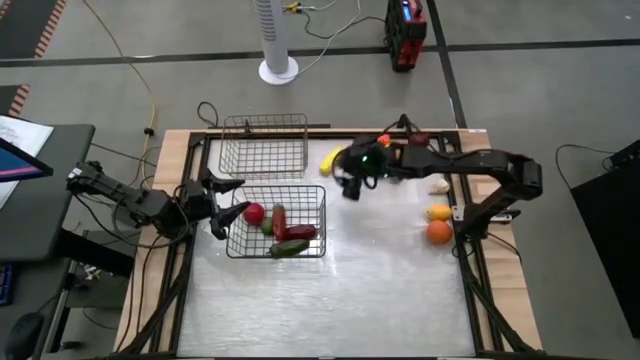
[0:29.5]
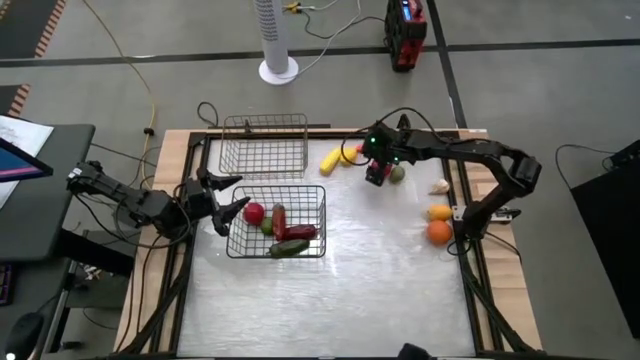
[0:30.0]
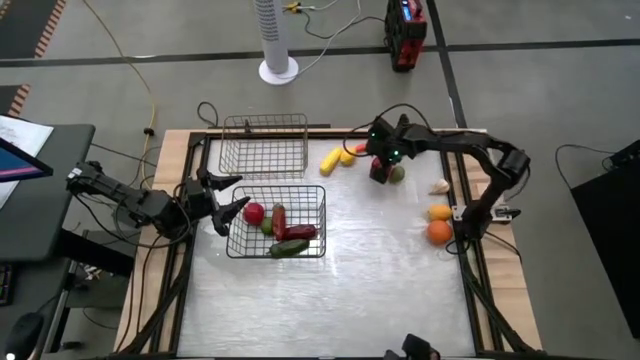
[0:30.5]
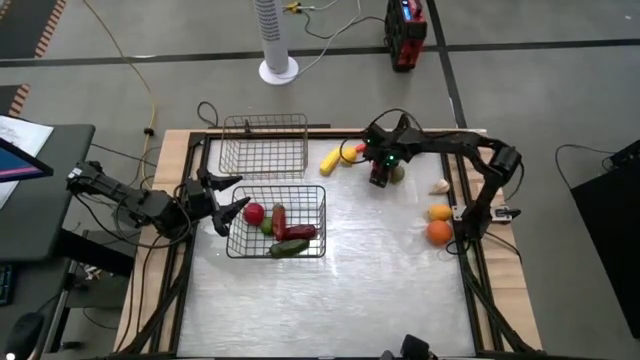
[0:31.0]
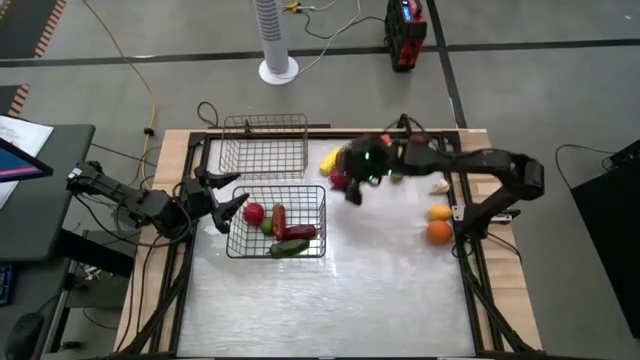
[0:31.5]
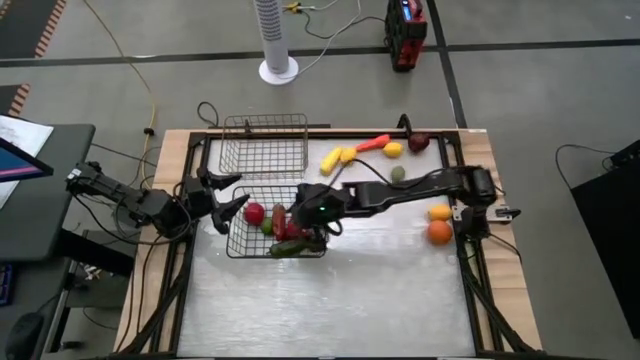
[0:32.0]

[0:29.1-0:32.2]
Task: Sort produce into baskets
Put the red tomato into the bottom wire basket

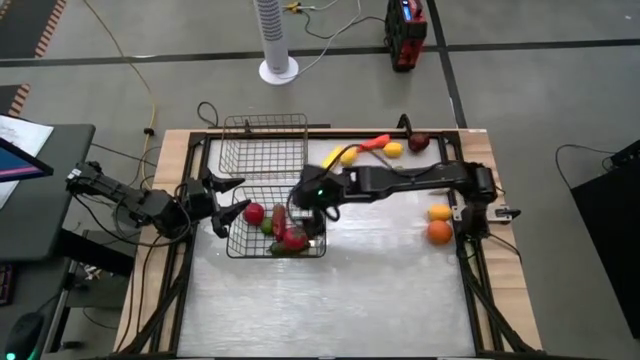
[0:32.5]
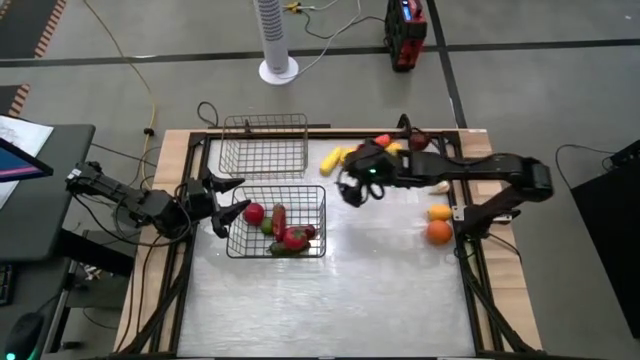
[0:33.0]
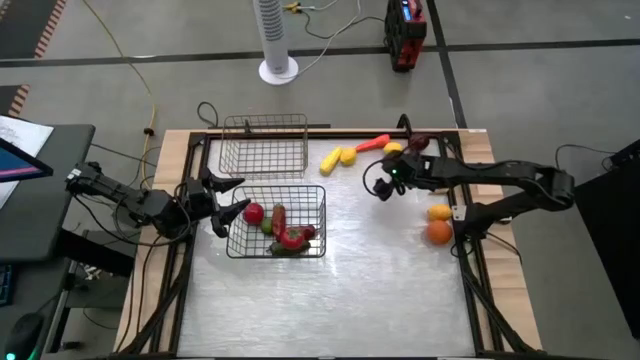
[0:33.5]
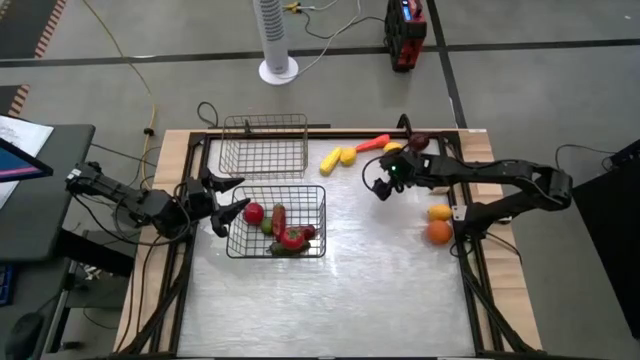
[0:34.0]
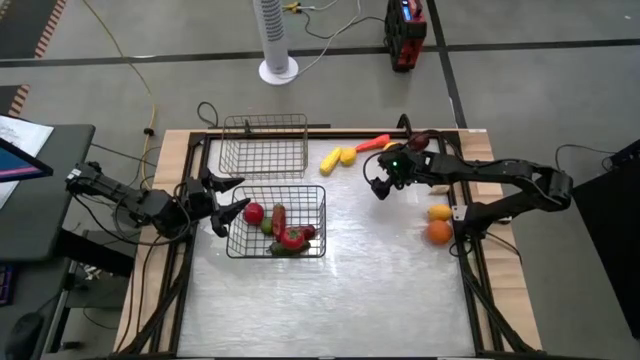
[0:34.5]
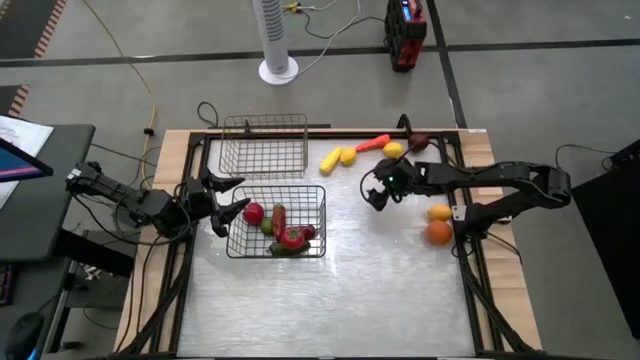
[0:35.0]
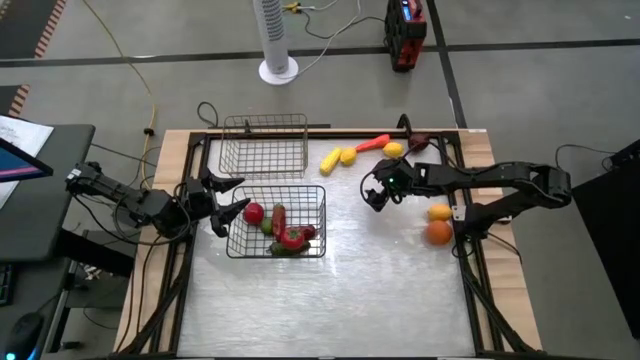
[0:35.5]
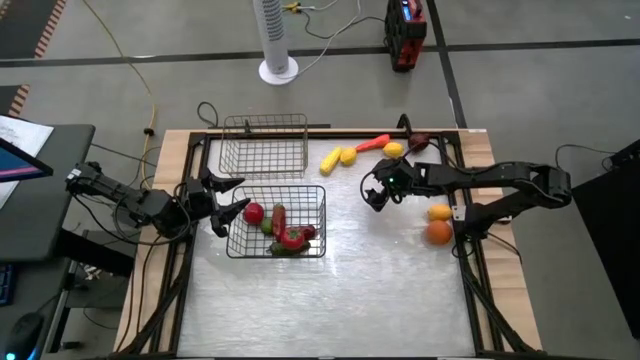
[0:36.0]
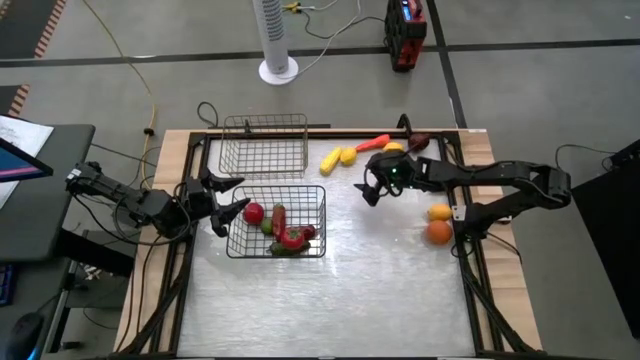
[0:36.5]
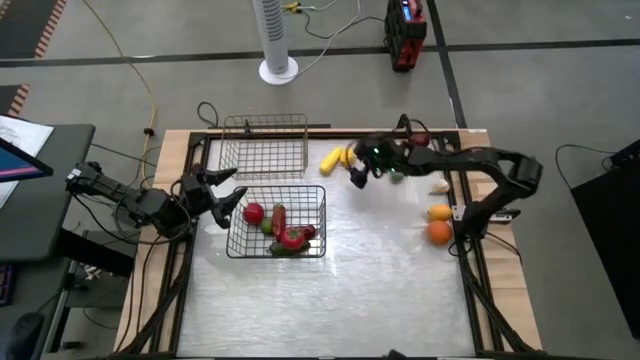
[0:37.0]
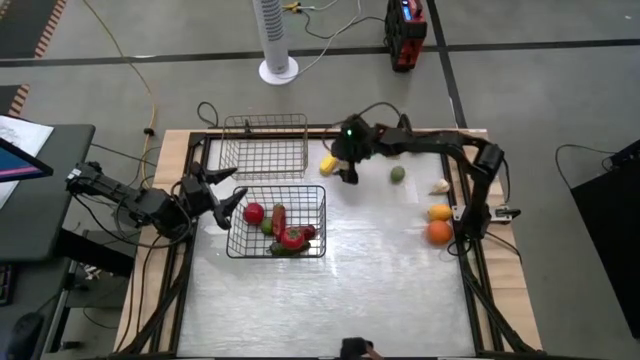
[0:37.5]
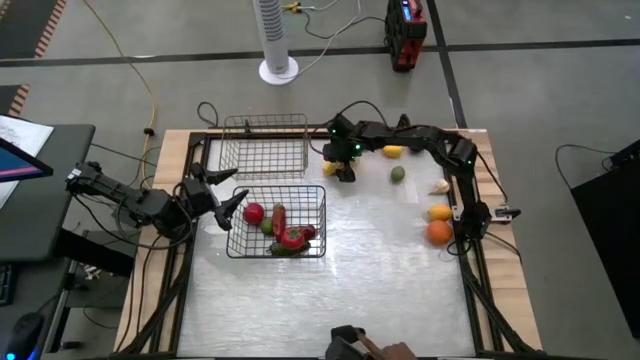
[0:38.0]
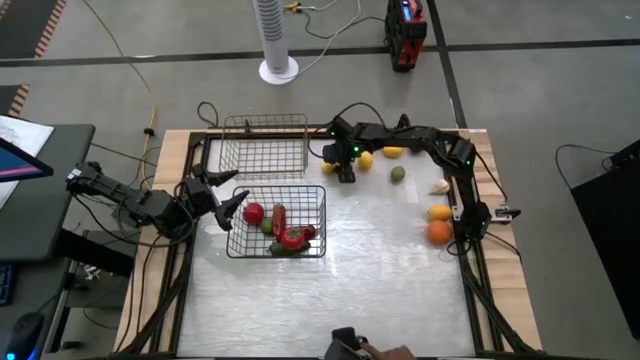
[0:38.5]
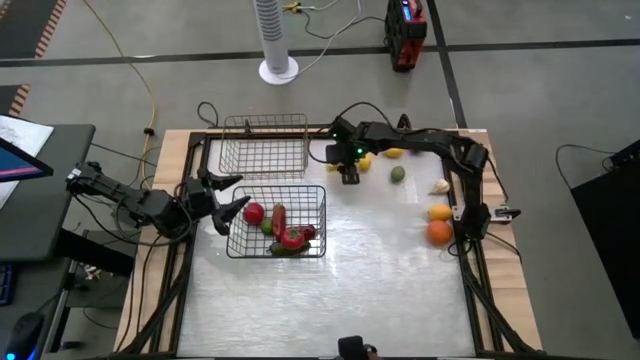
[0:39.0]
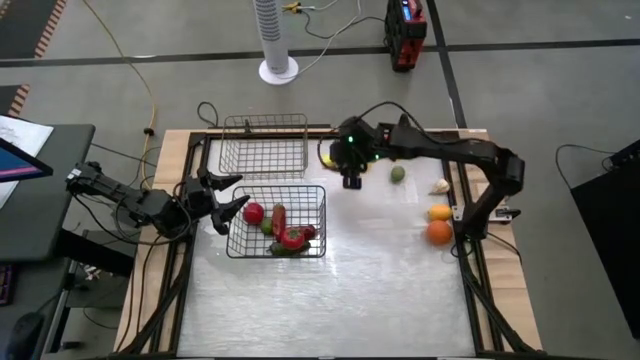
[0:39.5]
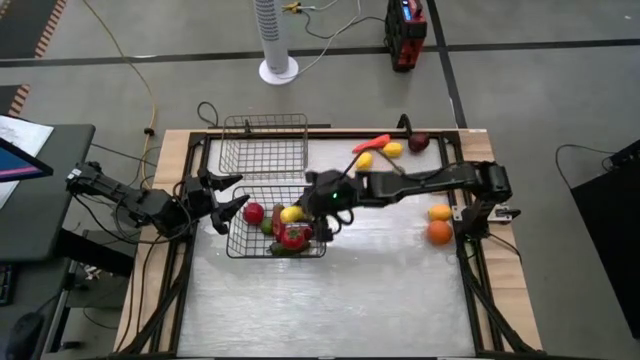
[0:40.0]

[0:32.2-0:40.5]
Put the yellow corn into the bottom wire basket

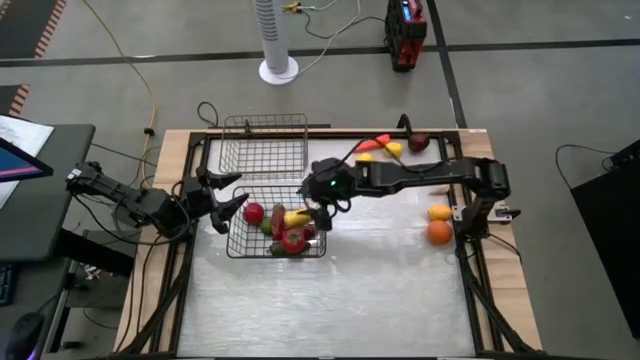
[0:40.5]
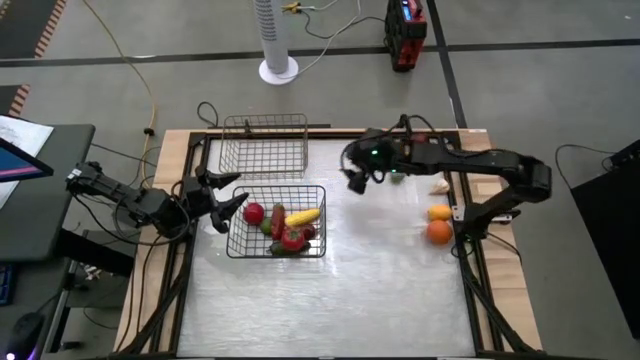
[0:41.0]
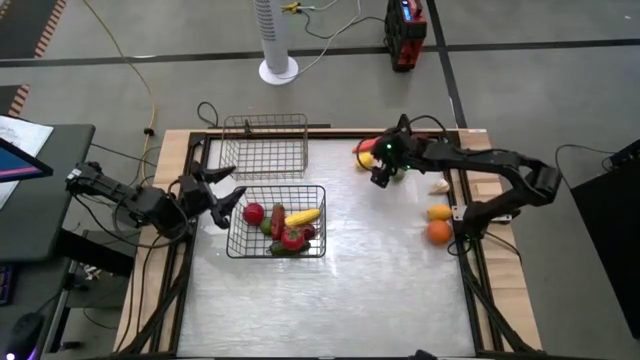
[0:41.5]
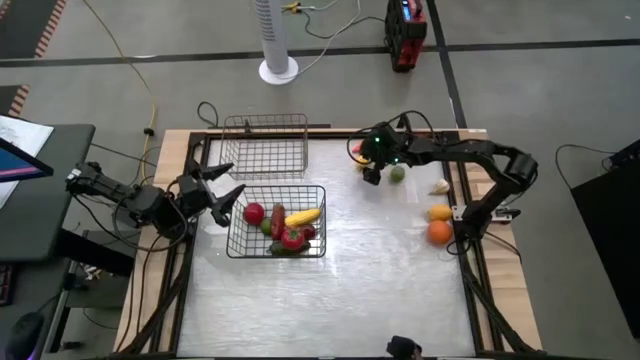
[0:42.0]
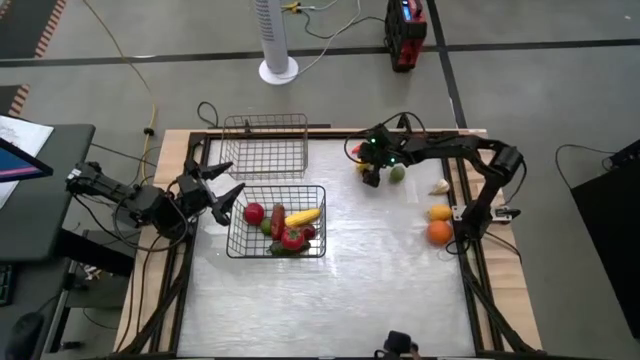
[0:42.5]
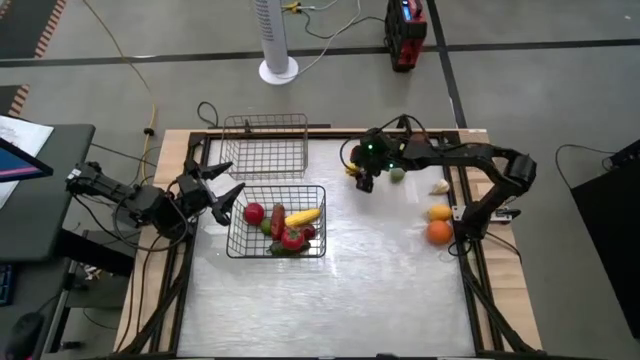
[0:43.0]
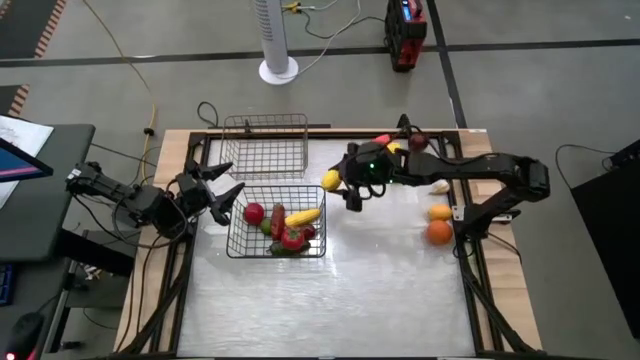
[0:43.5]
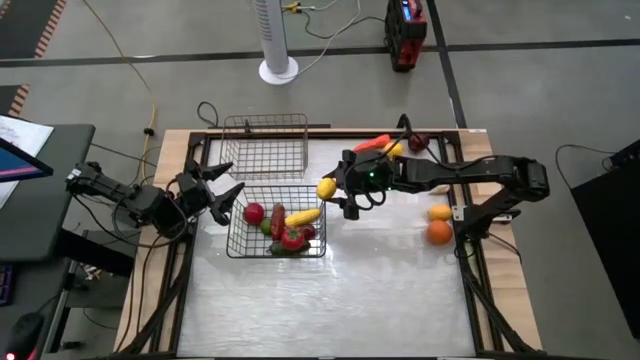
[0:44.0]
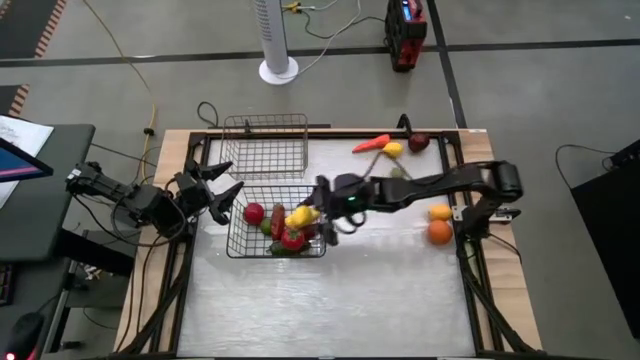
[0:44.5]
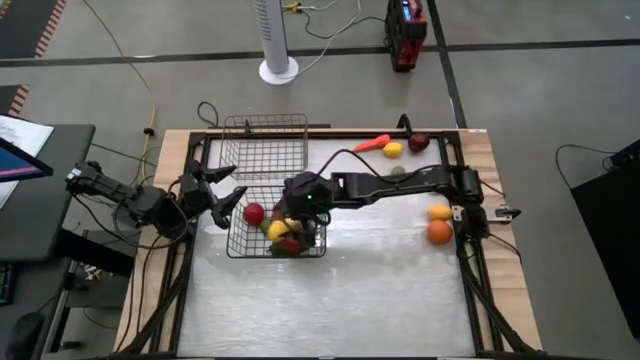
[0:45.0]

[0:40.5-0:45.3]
Put the top left yellow lemon into the bottom wire basket

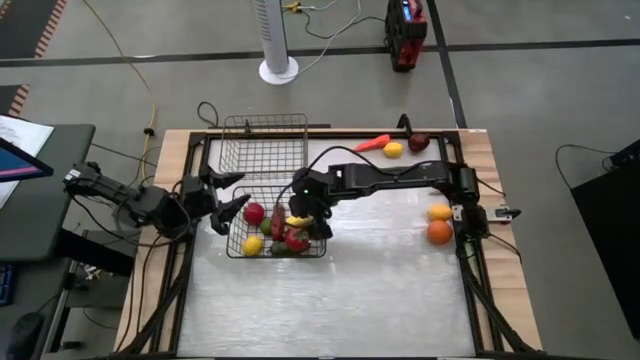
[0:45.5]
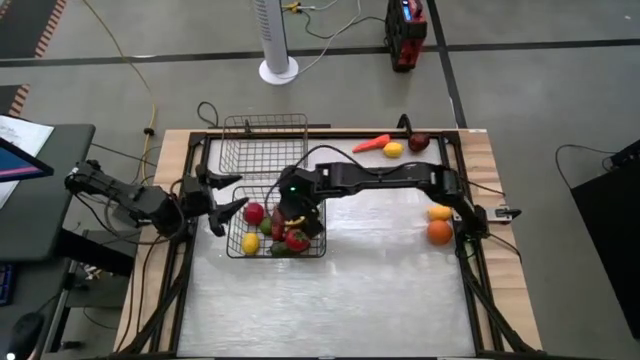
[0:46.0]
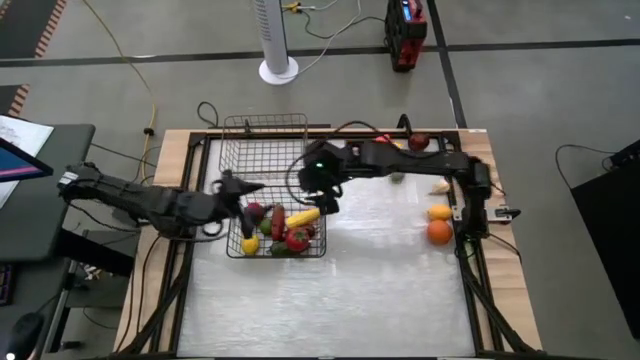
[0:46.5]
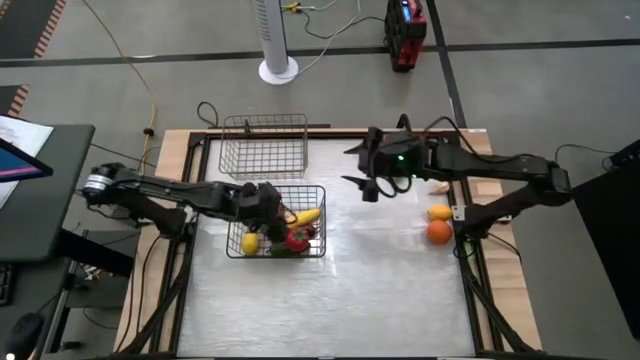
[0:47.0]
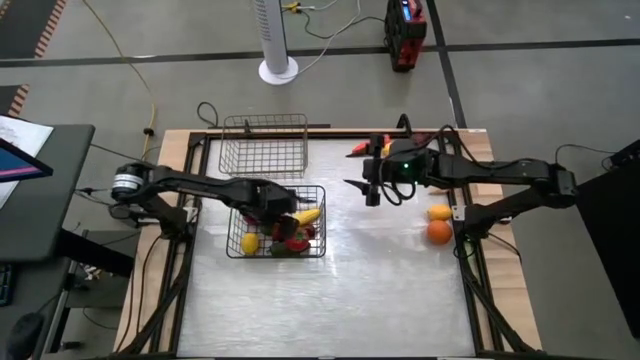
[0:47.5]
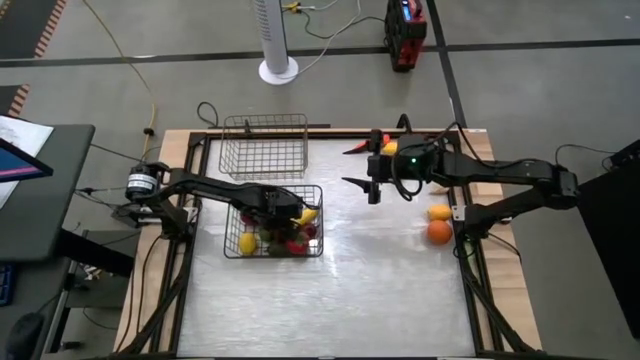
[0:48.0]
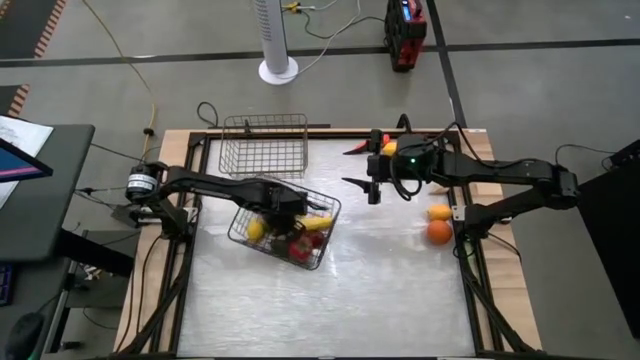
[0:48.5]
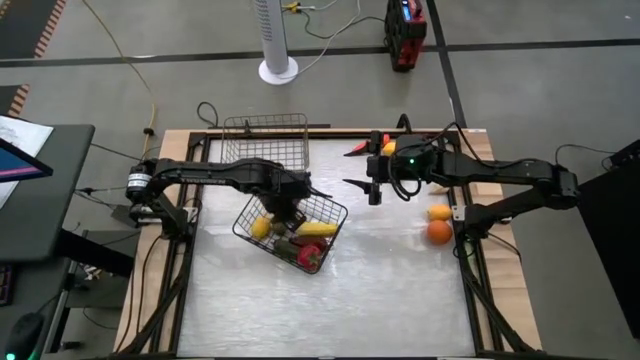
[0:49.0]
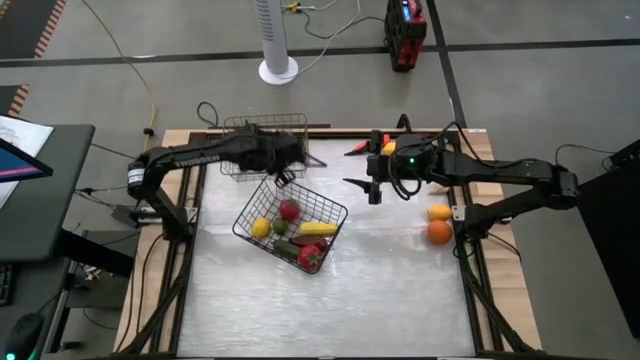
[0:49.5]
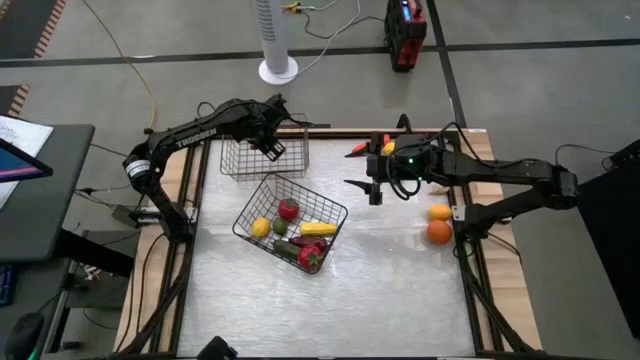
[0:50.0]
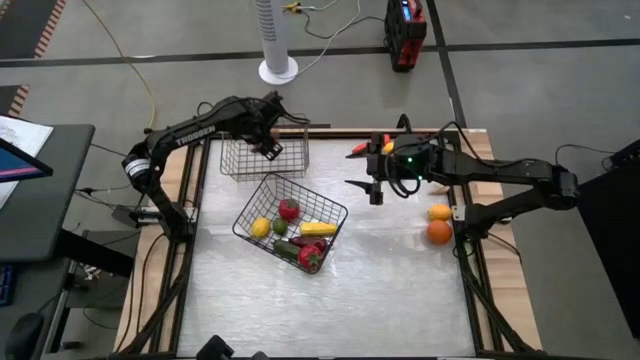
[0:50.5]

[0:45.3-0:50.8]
Put the top red chili pepper into the top wire basket
